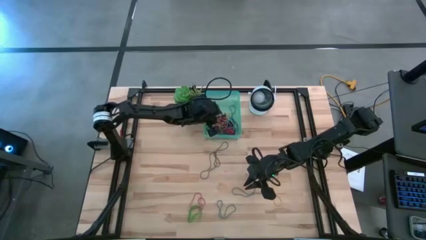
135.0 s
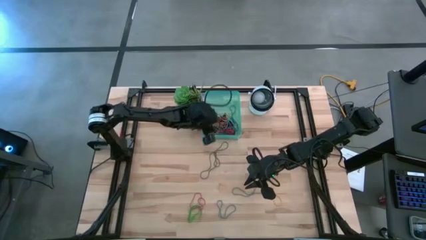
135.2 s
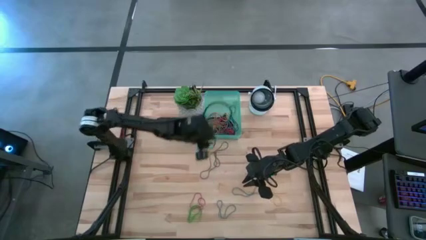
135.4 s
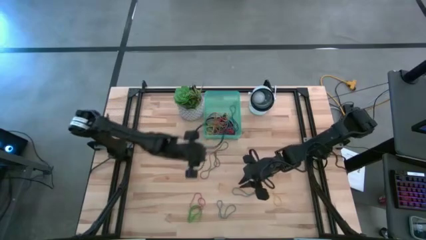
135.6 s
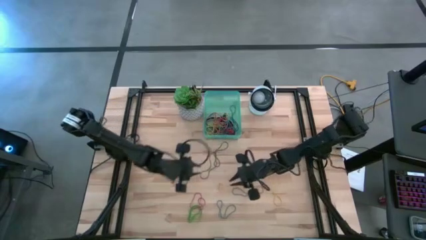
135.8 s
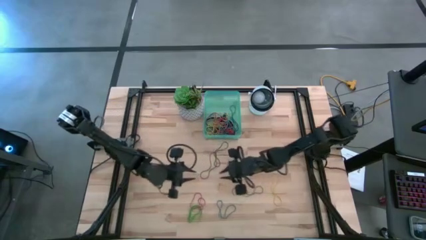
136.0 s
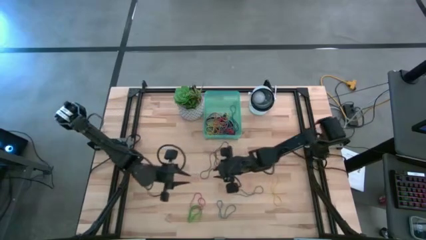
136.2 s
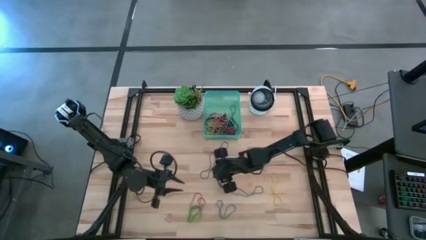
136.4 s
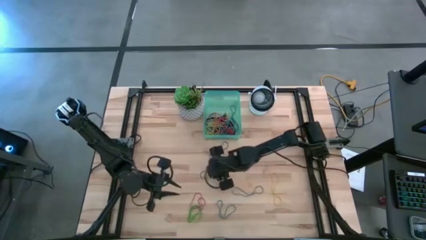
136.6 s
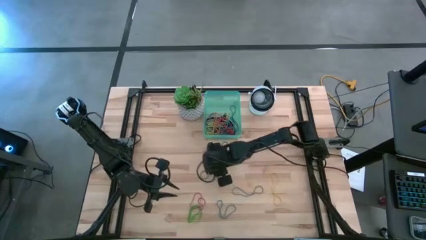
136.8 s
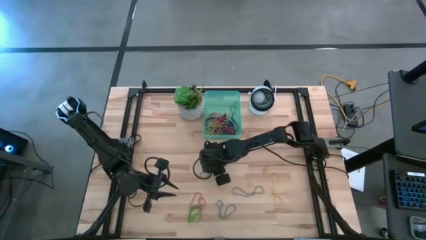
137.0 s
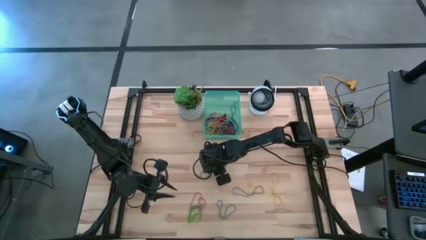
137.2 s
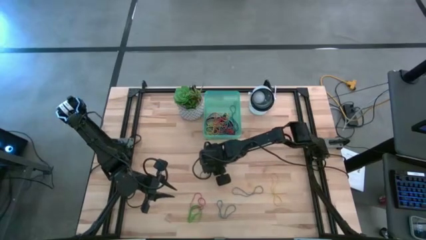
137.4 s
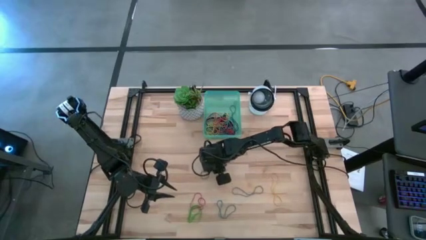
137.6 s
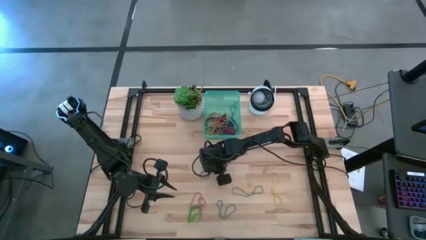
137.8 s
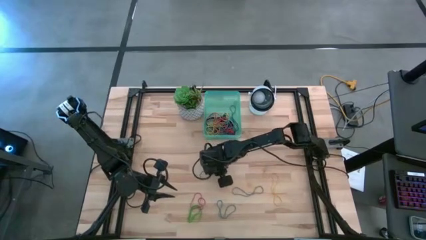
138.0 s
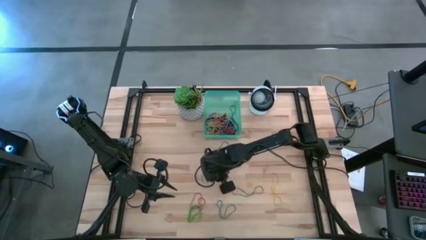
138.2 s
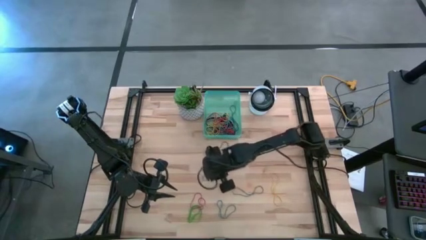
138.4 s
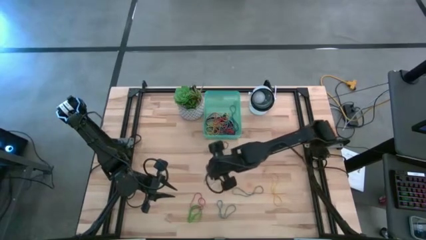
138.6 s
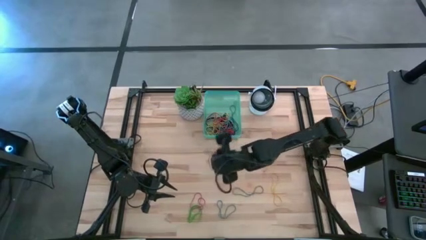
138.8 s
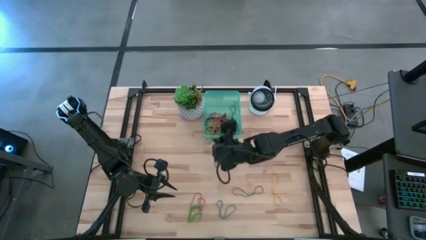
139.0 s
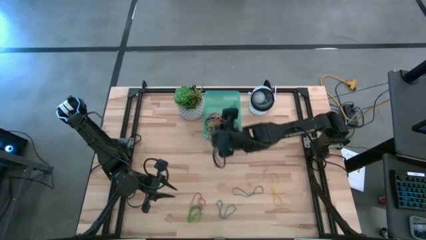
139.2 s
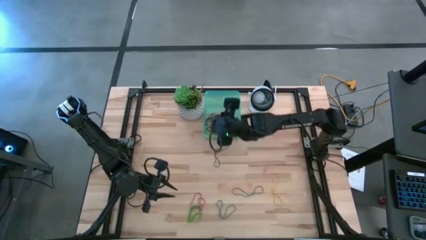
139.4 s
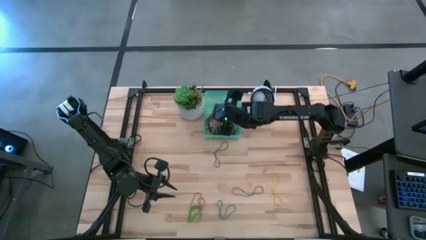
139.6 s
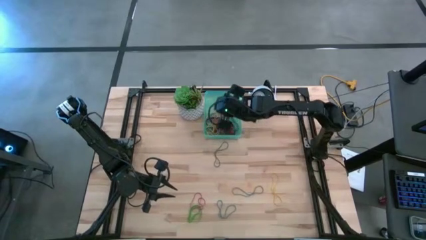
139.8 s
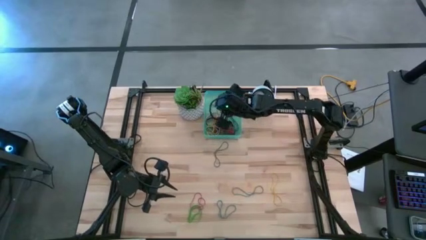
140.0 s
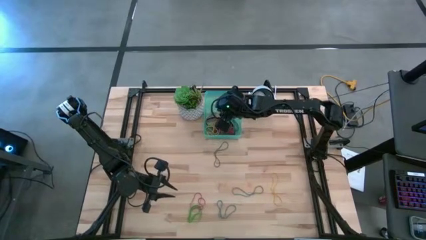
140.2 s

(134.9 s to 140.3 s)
Task: Pick and place rubber bands into bin
Put the violet rubber band into the green bin

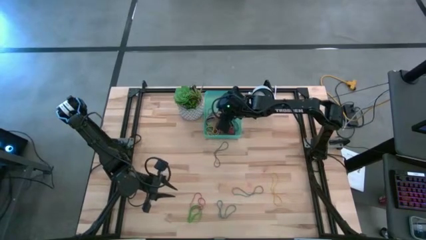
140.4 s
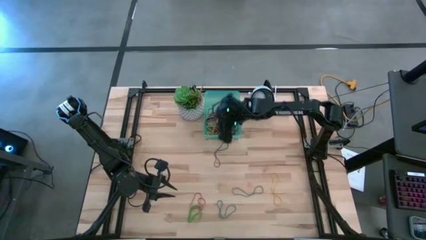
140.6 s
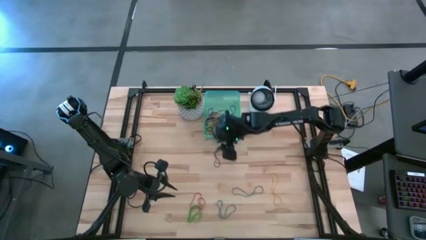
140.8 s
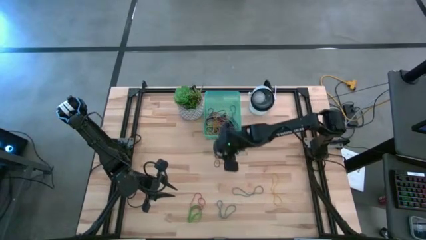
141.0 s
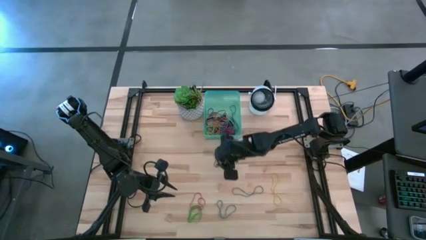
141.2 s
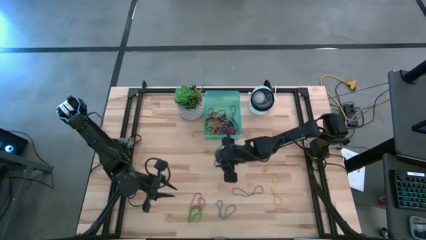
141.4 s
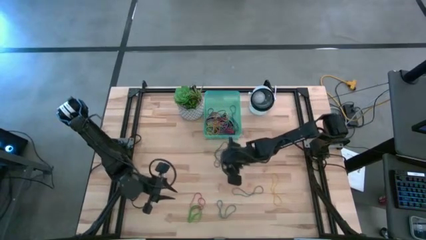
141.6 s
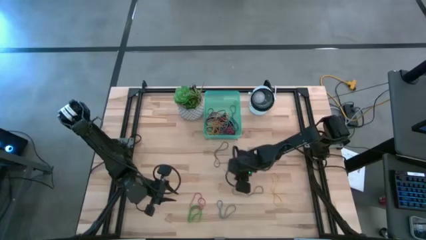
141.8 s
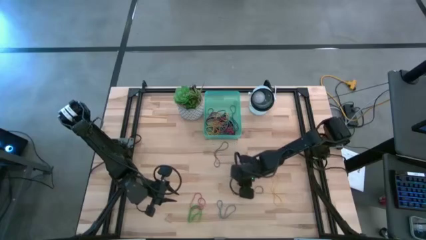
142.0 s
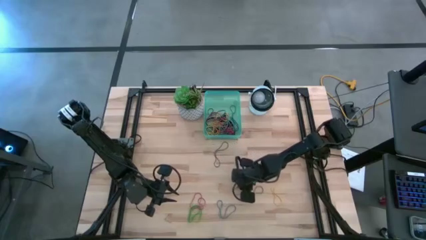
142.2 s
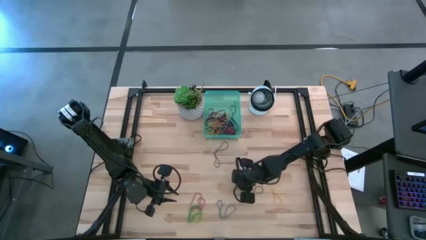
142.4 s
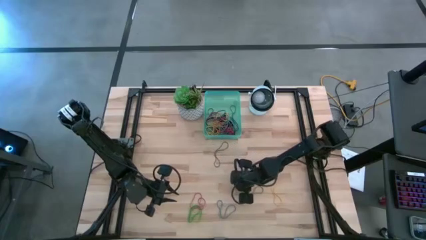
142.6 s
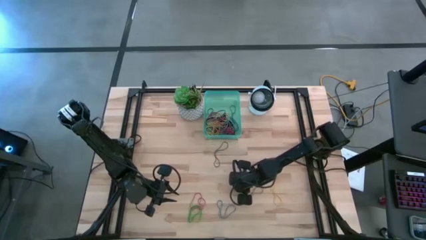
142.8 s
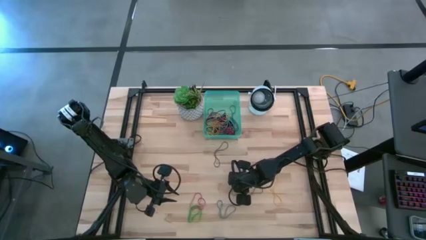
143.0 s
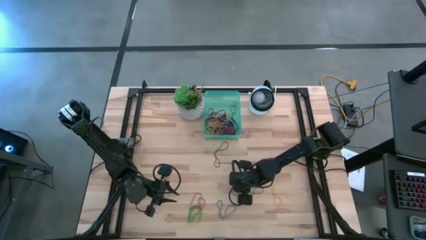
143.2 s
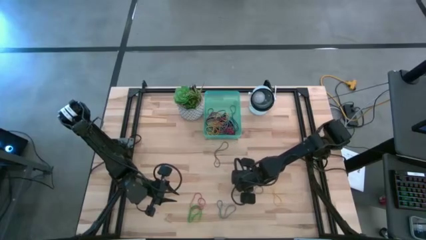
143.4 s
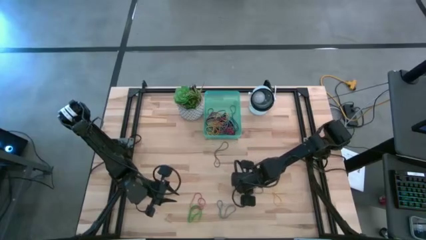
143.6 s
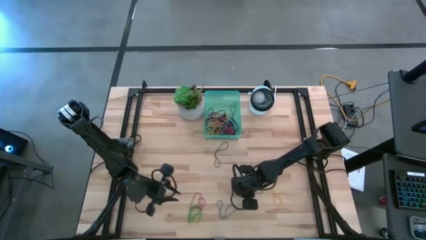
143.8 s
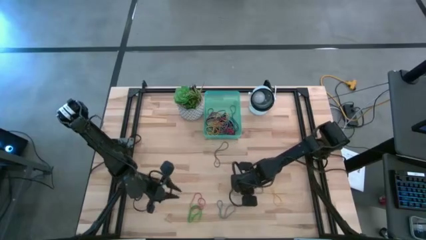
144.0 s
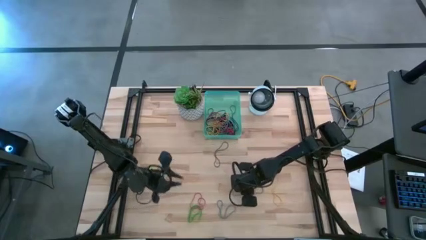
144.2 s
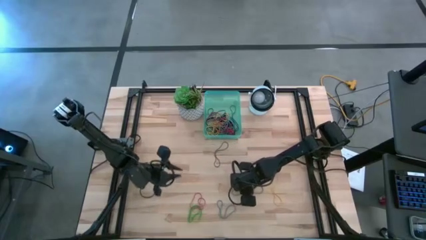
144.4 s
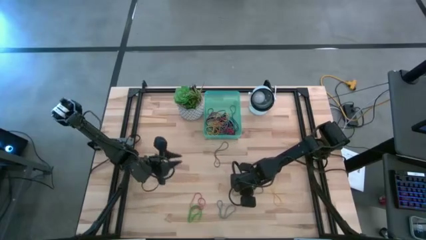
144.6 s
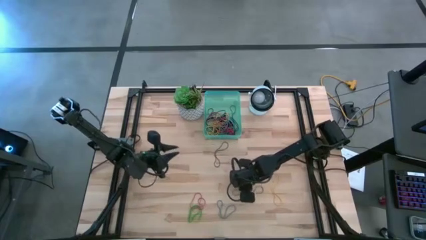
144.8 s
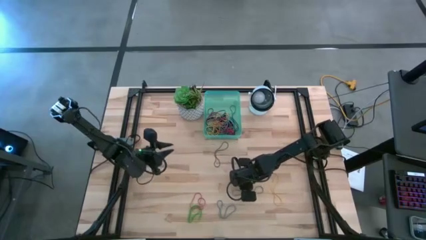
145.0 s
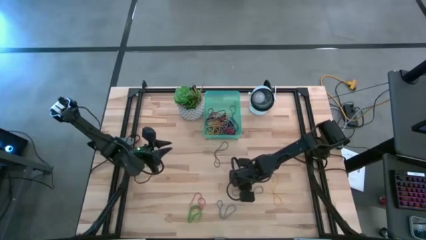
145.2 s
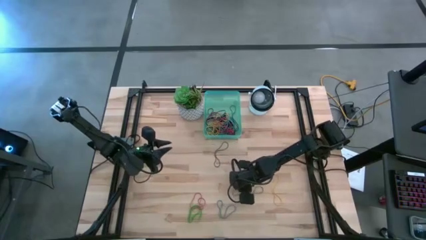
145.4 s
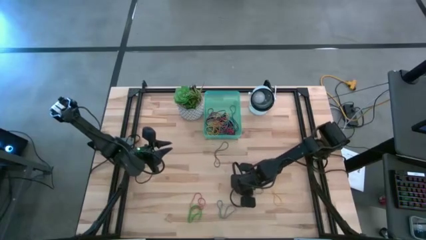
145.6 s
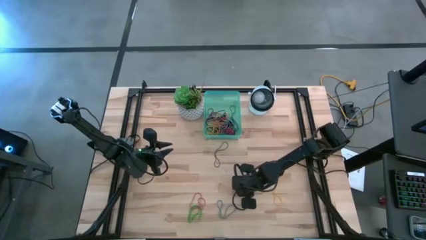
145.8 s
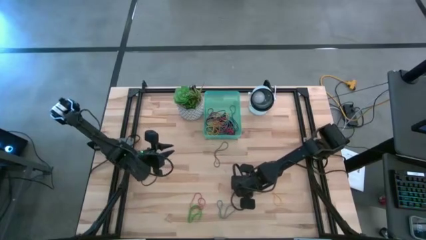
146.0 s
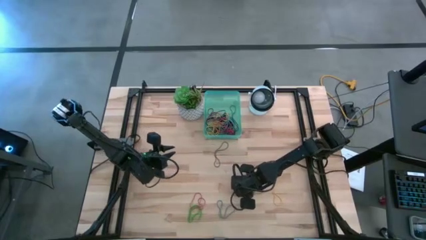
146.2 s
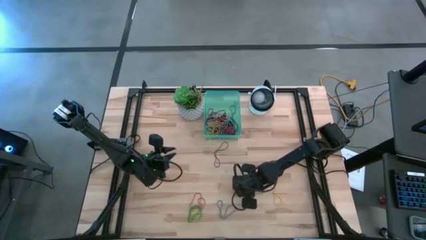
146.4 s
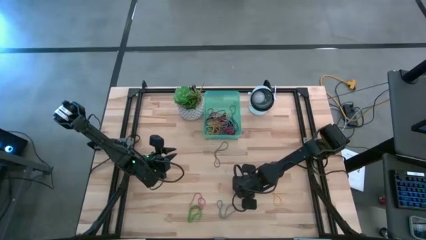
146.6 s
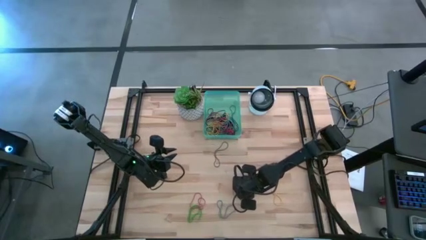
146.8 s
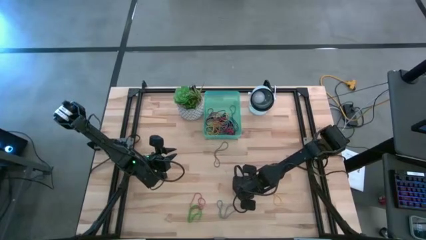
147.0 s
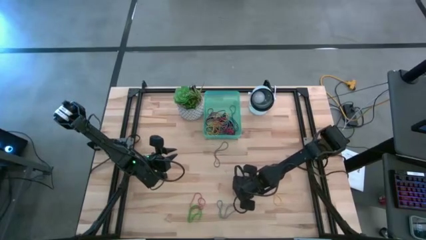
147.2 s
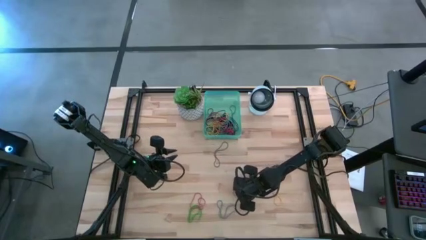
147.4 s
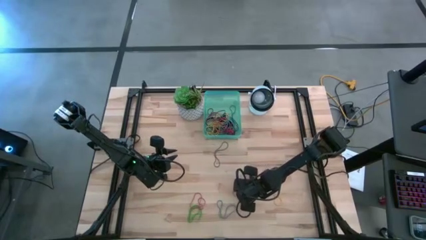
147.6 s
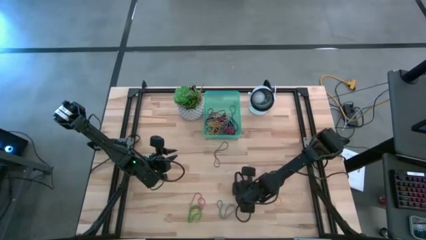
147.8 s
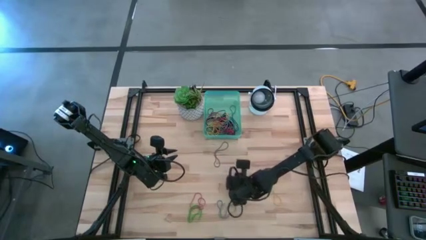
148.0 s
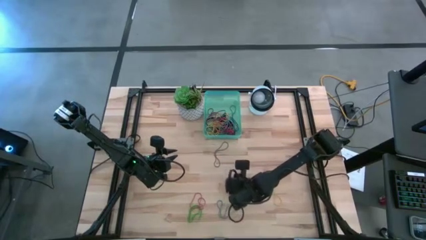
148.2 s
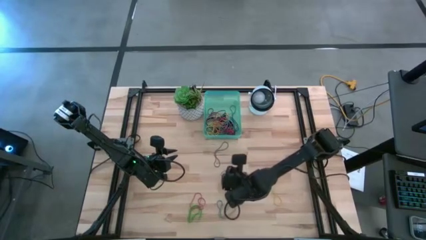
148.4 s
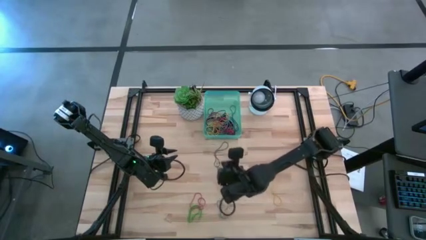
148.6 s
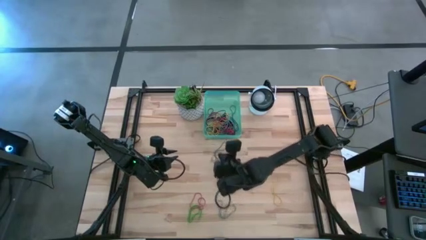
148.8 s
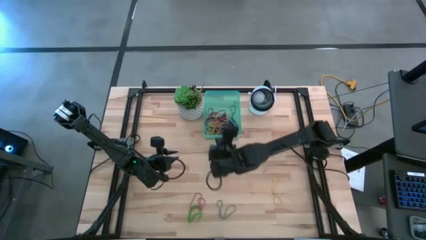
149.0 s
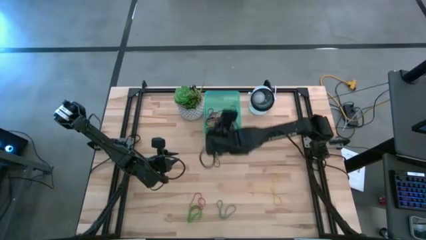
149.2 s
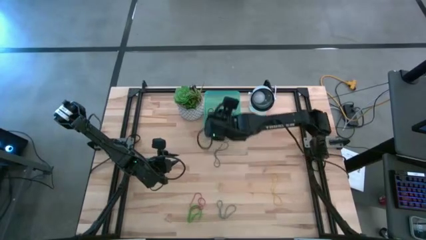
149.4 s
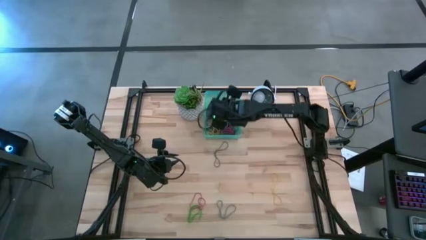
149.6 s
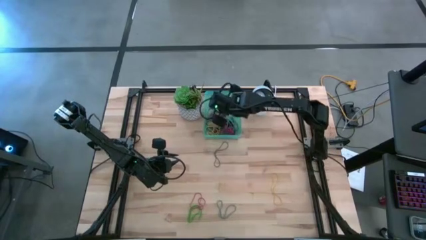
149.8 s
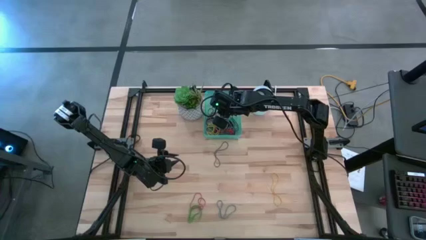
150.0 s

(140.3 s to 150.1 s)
Put the blue rubber band into the green bin

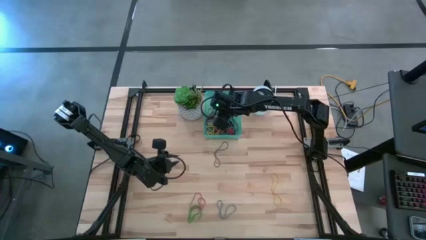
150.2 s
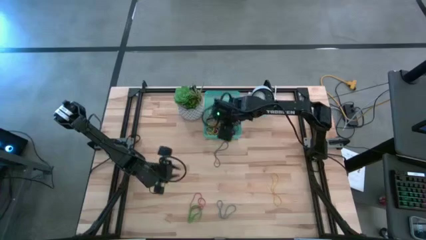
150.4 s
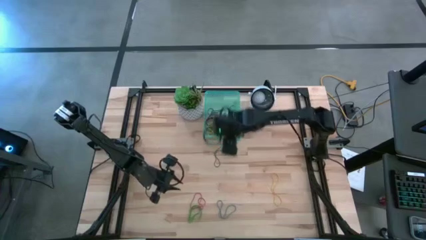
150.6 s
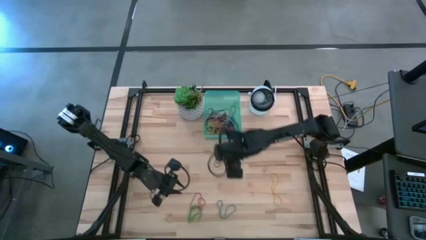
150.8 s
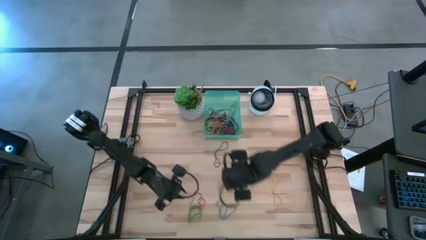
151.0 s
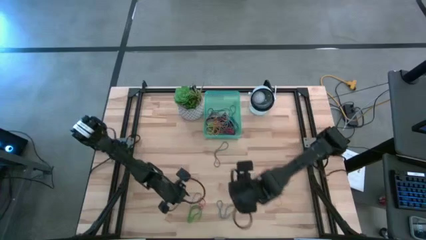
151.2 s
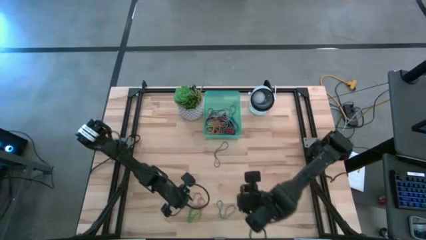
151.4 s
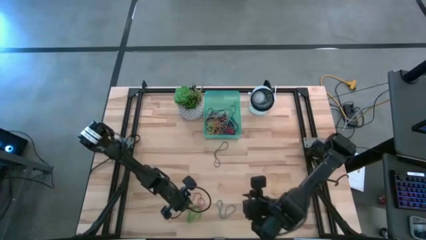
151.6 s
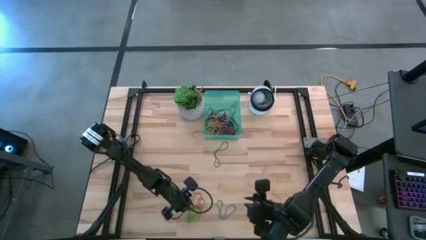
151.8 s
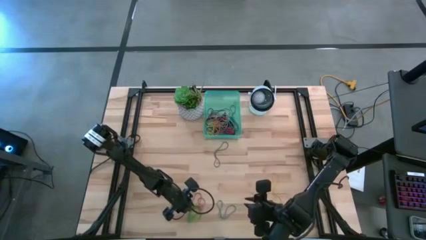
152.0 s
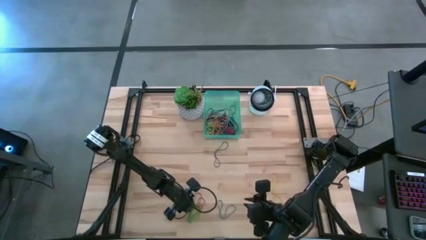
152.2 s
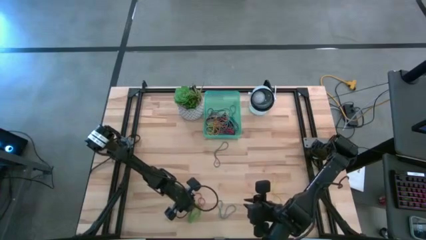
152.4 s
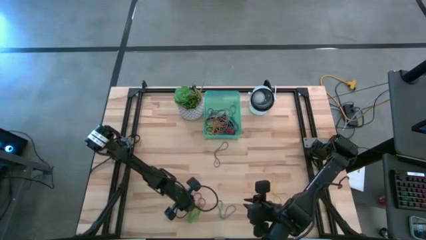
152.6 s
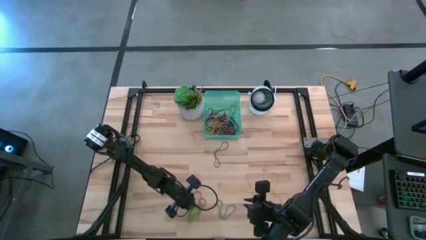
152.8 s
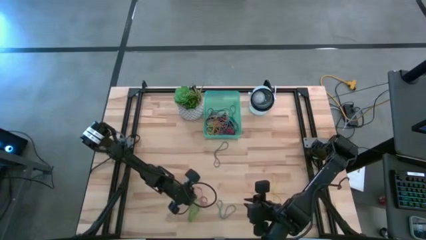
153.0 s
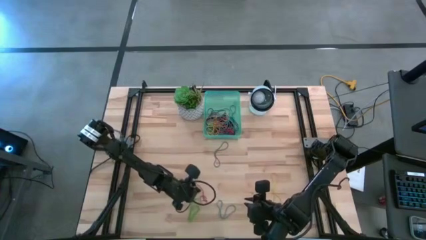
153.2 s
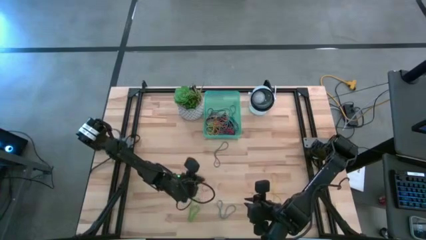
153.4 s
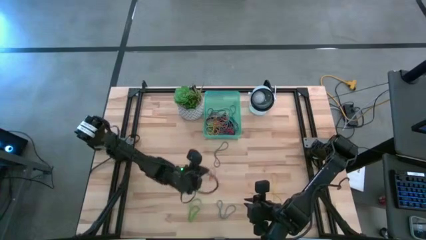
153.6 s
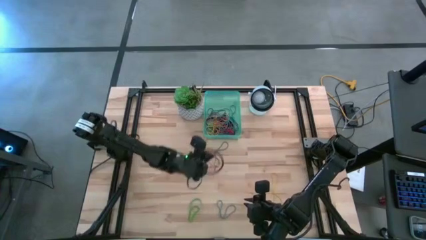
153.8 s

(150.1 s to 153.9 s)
Put the red rubber band into the green bin
